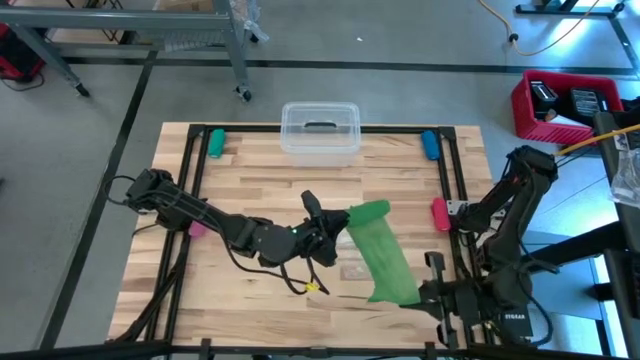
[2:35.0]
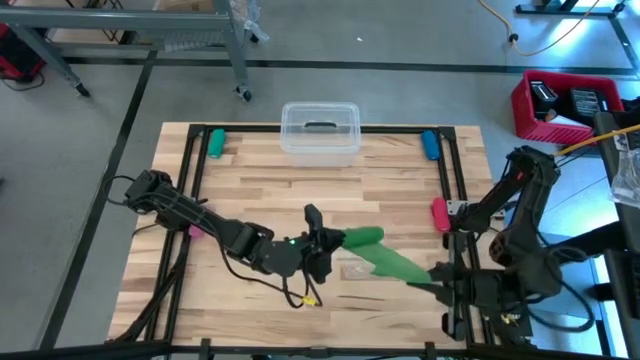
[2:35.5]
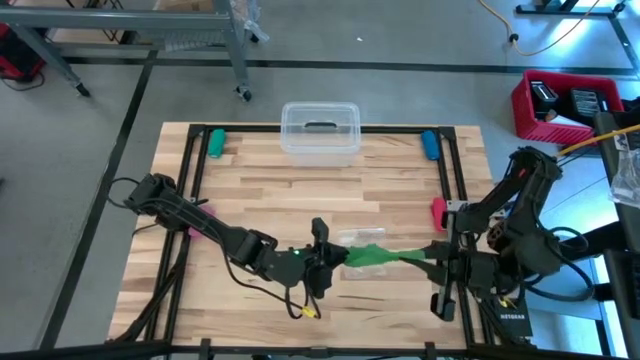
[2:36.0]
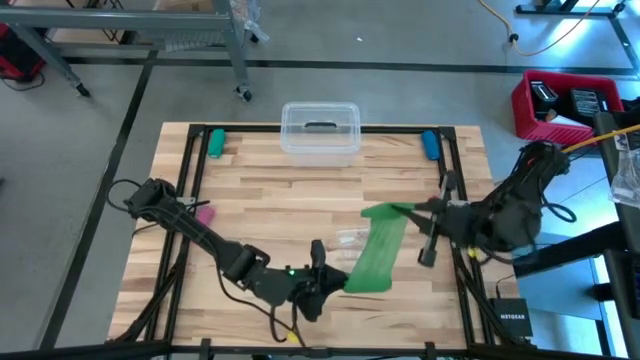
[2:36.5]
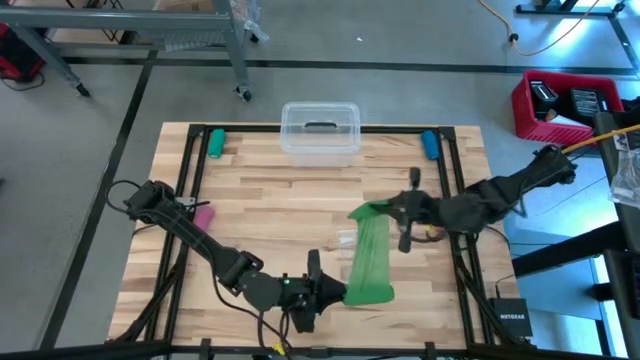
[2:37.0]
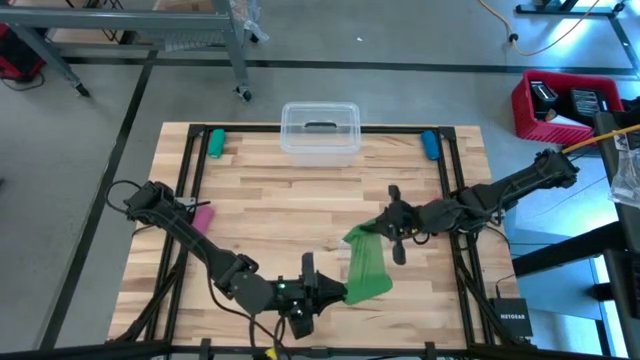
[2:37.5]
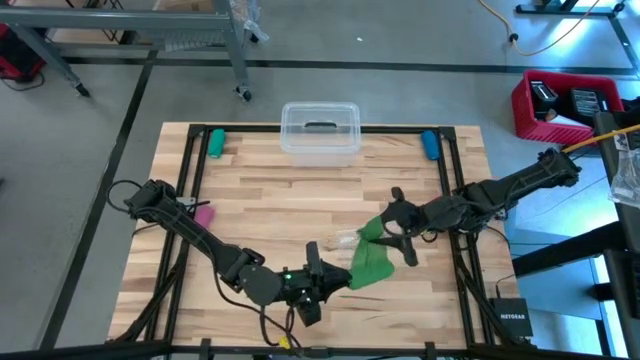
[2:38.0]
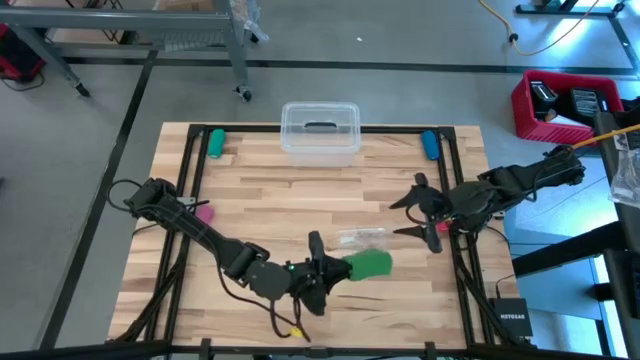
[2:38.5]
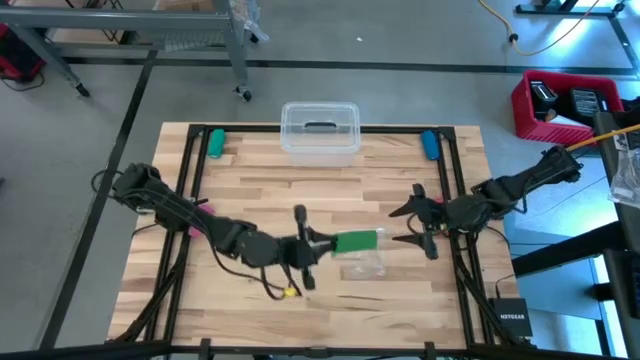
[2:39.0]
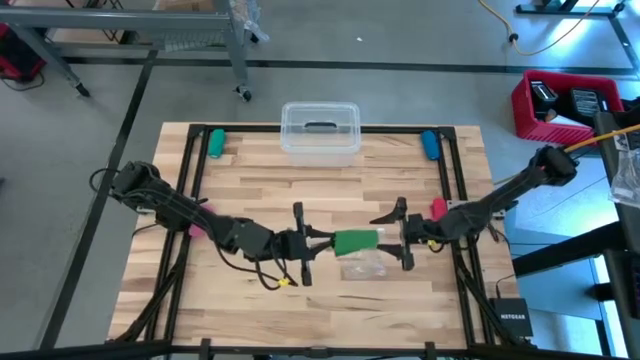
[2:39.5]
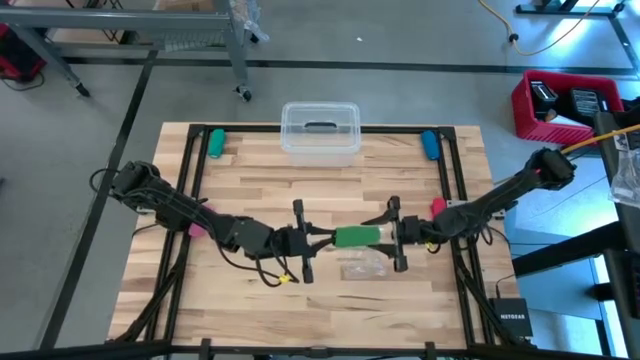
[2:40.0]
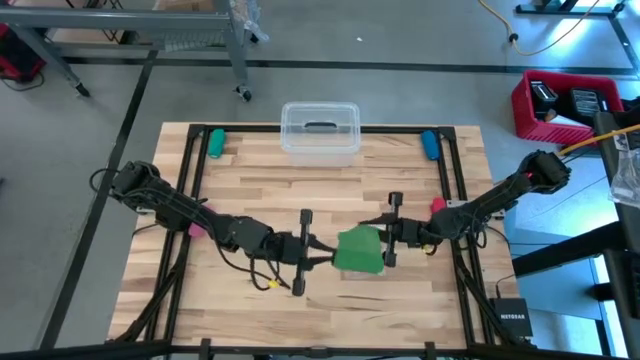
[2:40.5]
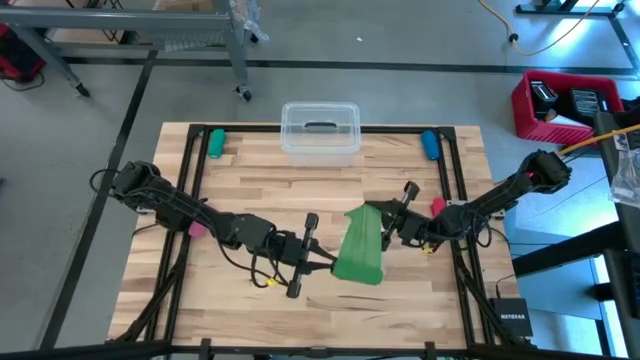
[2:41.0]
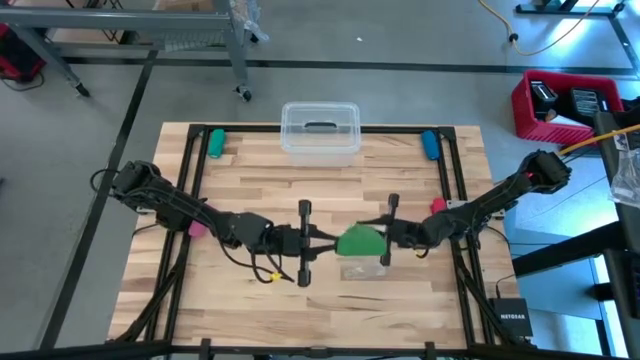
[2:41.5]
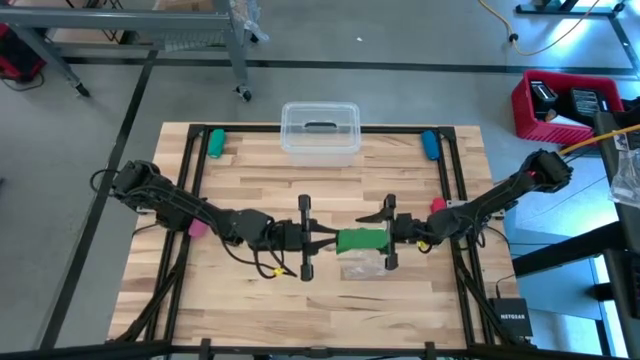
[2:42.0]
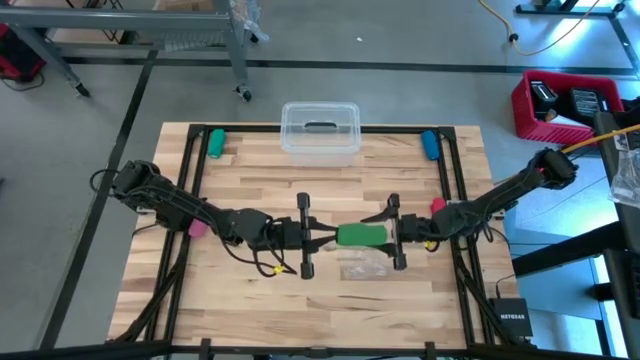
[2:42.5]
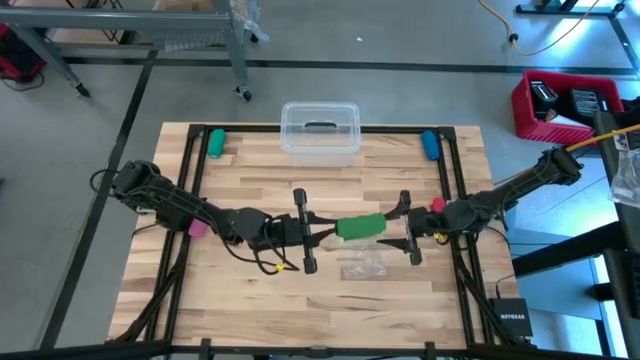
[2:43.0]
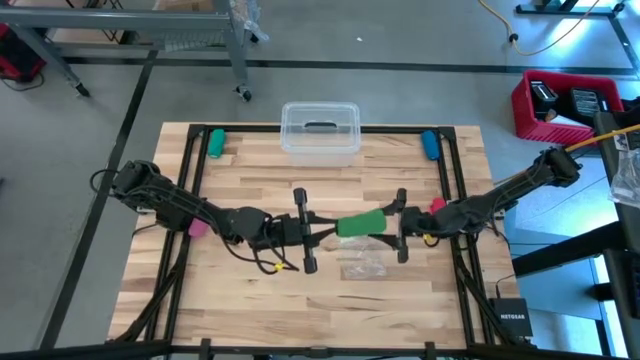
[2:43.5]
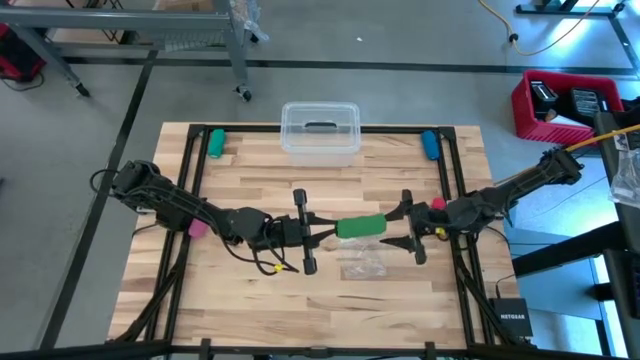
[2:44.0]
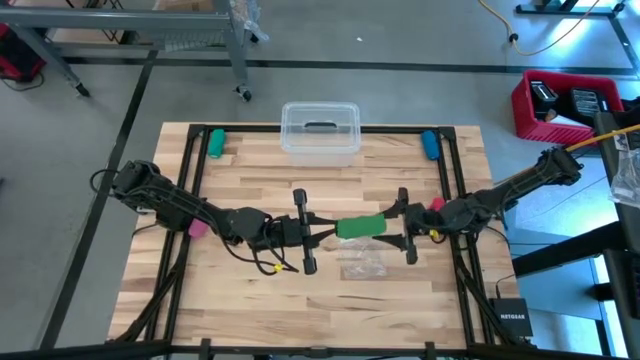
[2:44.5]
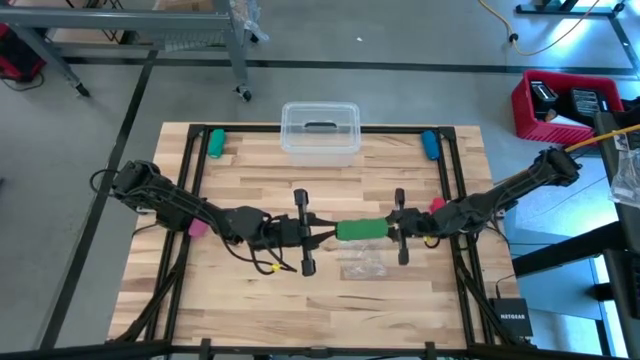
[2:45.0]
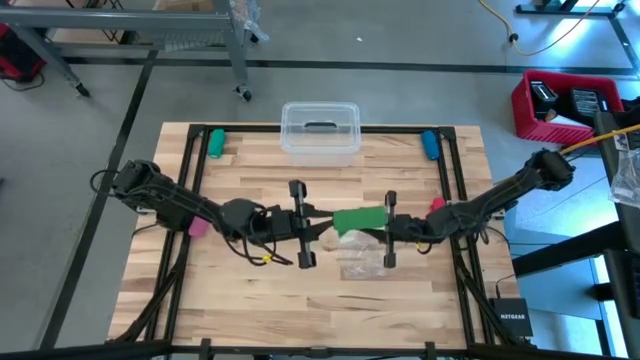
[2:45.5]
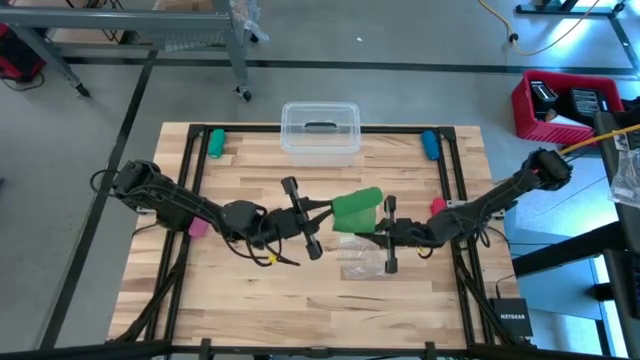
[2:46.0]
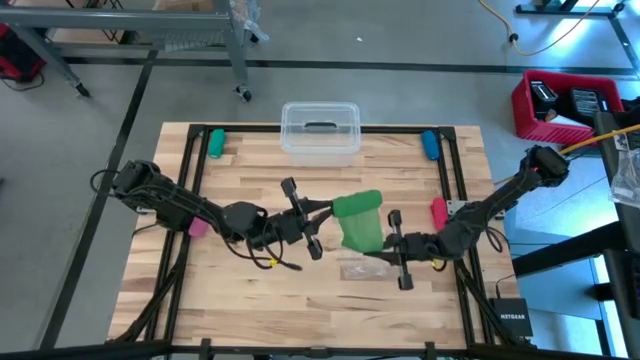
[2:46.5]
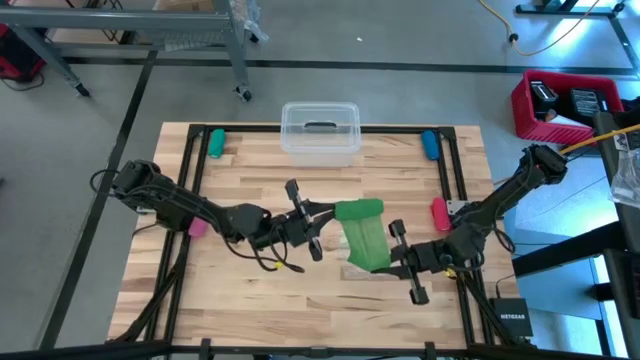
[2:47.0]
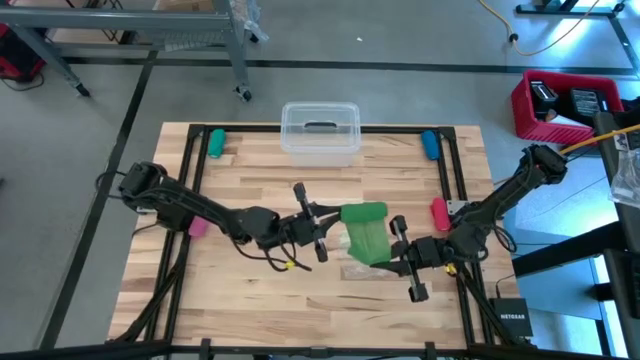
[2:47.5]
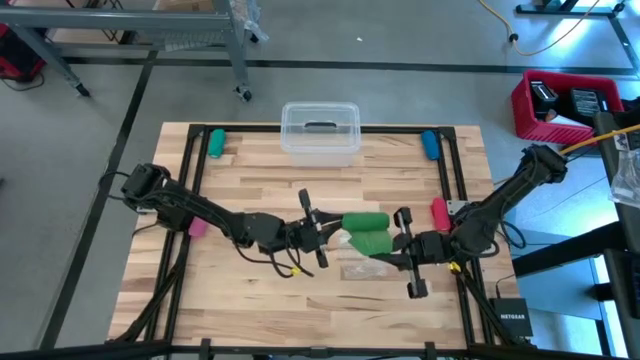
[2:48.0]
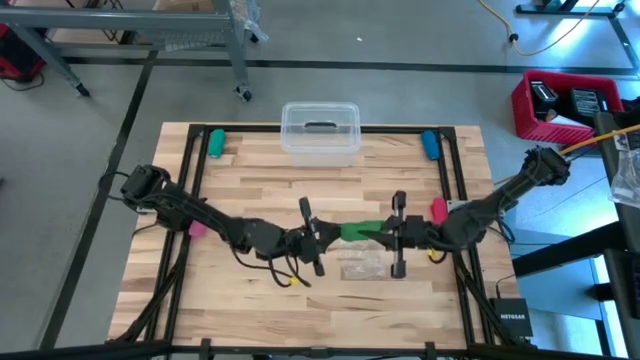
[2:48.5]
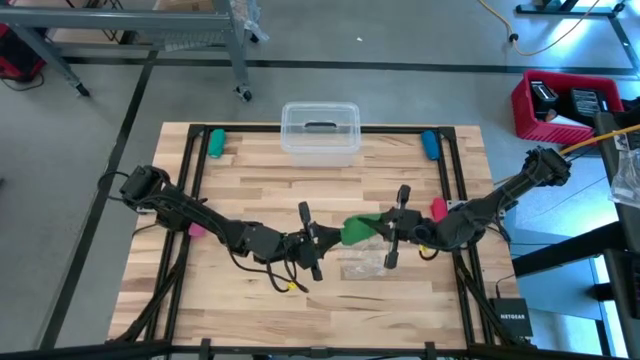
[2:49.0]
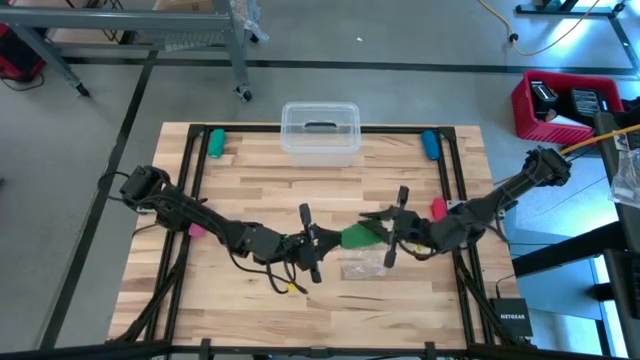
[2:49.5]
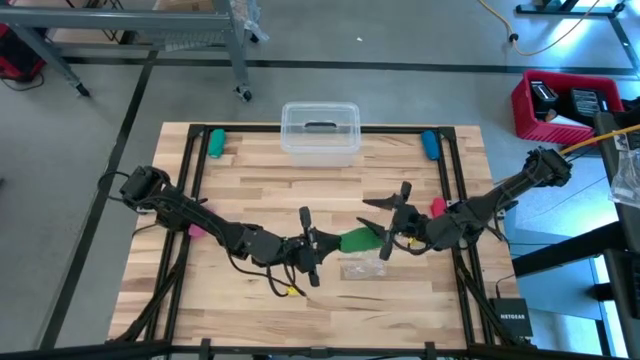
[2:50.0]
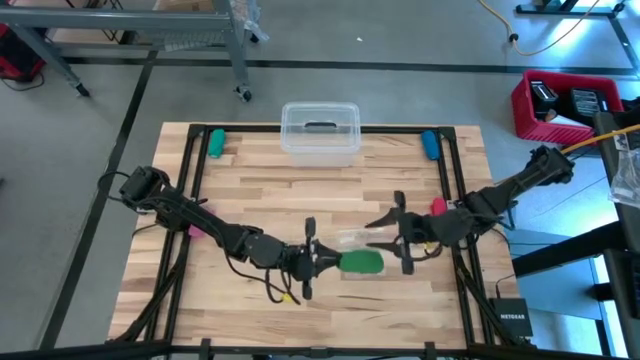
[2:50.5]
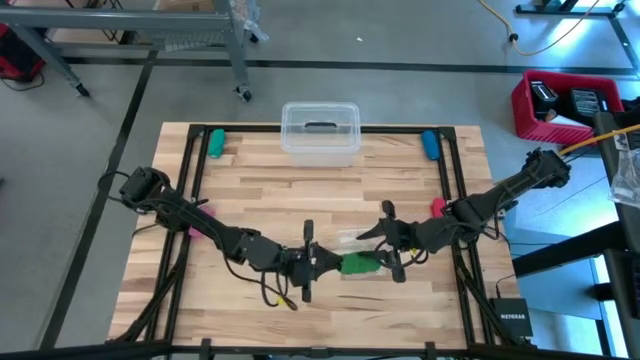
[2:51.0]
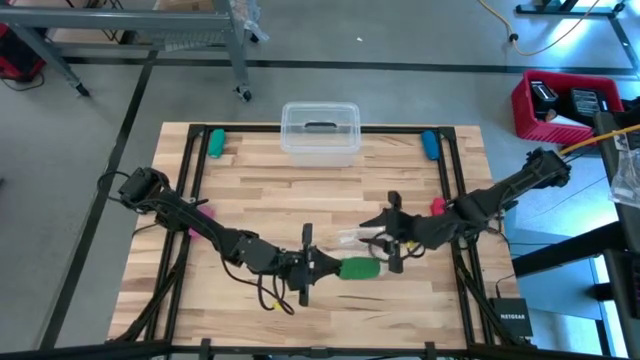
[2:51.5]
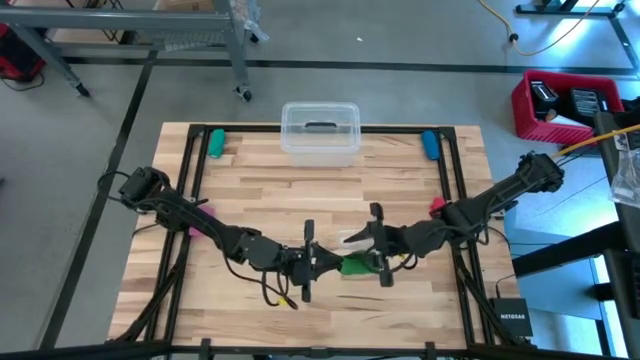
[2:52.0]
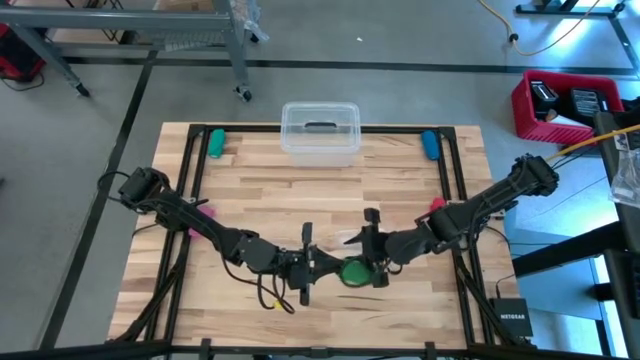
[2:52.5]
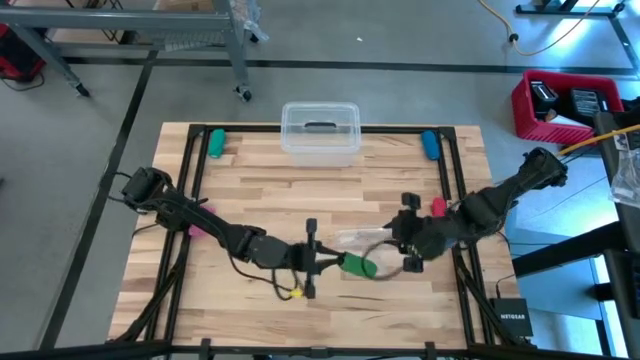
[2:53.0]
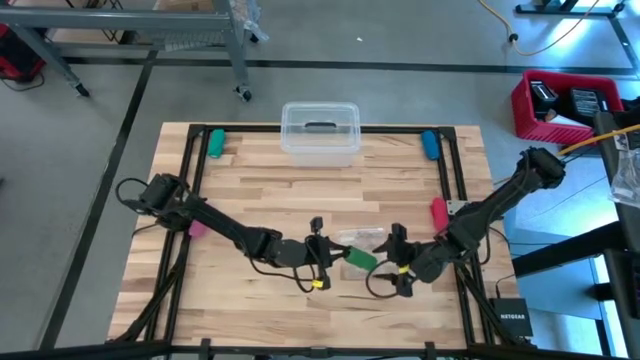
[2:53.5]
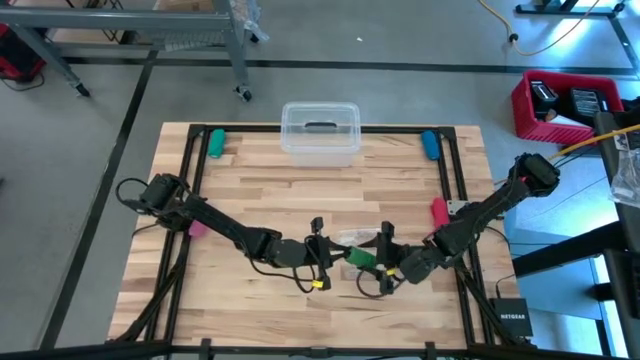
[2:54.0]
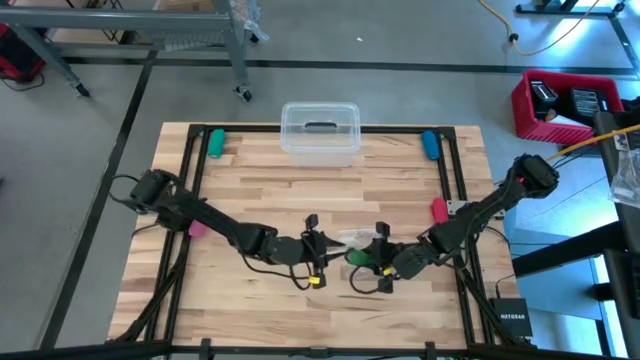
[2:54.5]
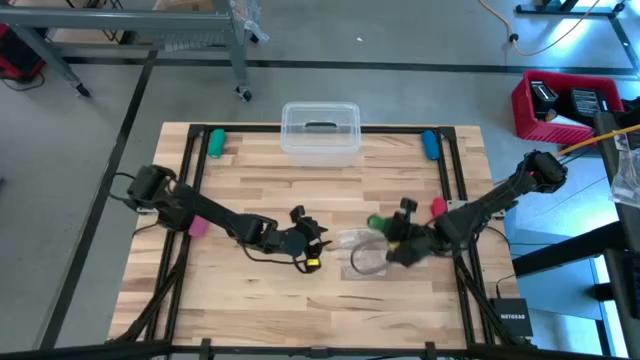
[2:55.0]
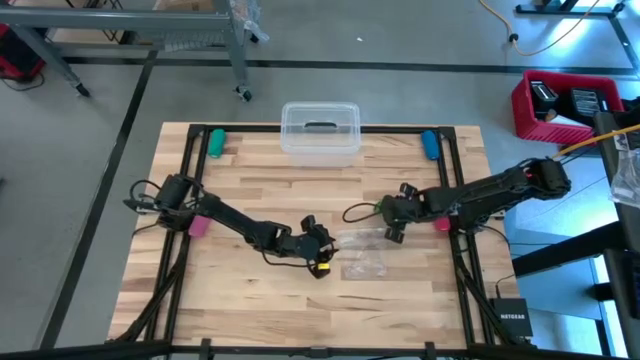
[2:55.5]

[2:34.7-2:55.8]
Task: Roll bandage
Roll the green bandage

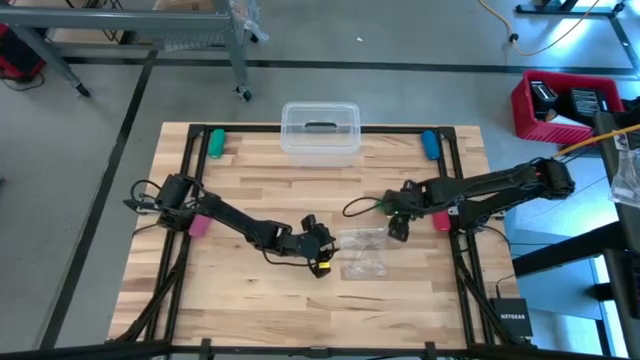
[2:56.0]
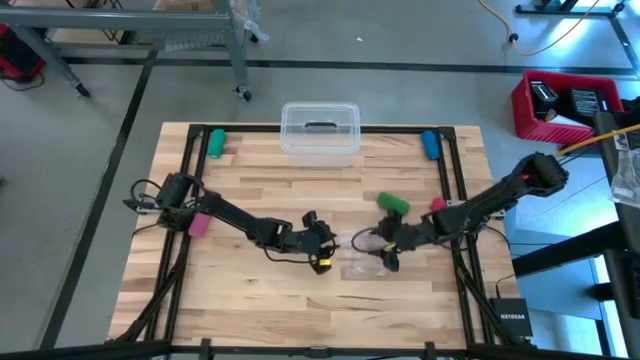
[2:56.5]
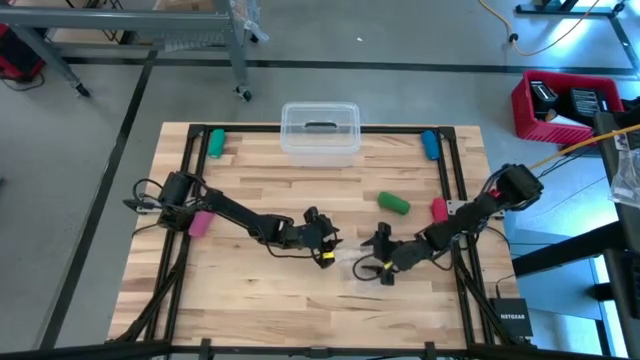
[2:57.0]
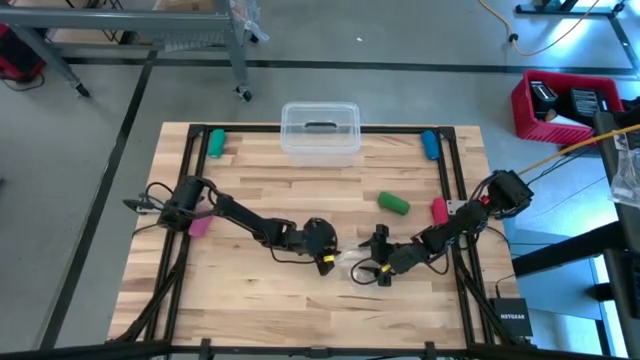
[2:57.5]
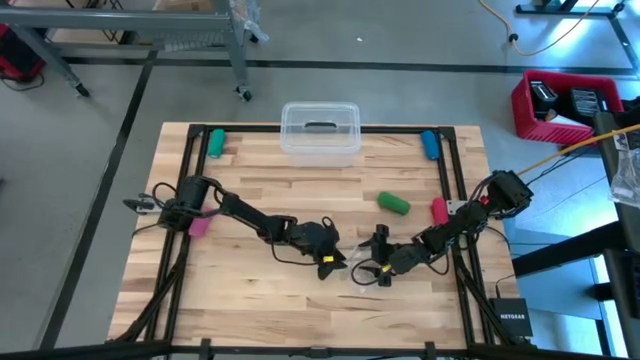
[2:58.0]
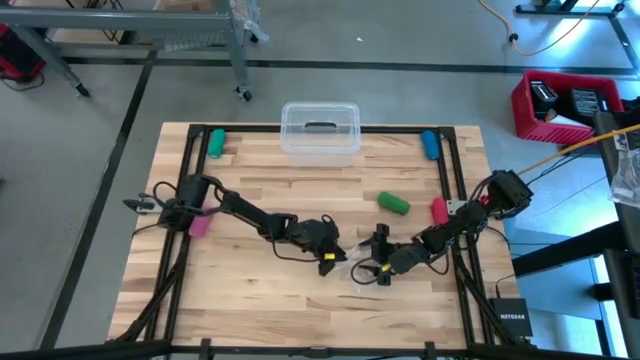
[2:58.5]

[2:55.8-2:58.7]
Open the transparent zip bag
